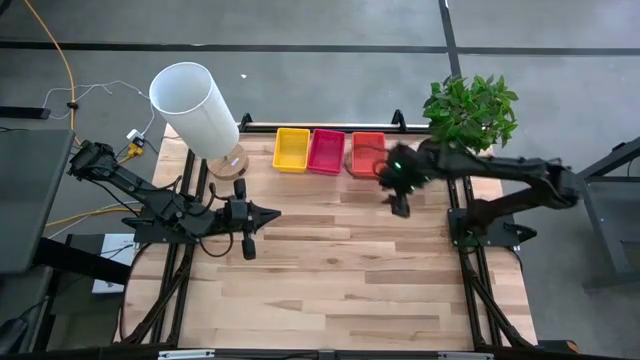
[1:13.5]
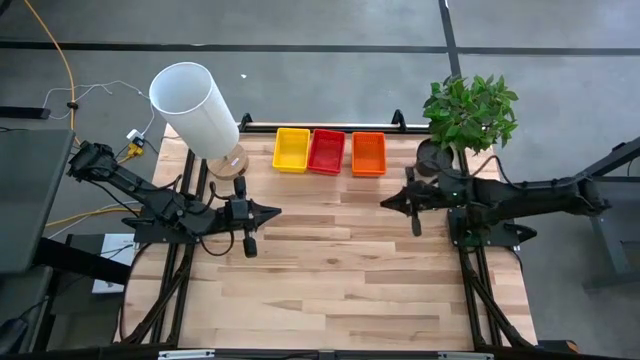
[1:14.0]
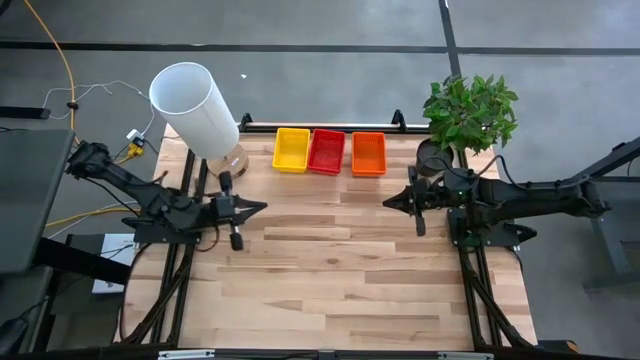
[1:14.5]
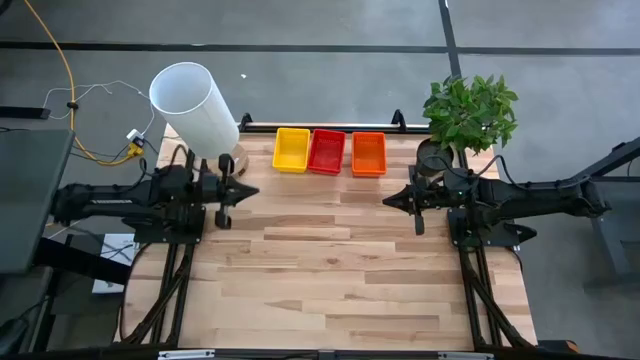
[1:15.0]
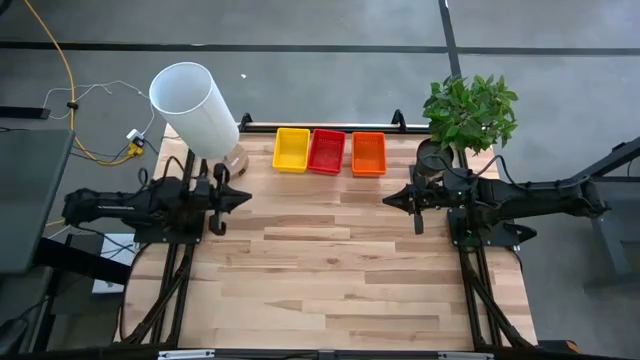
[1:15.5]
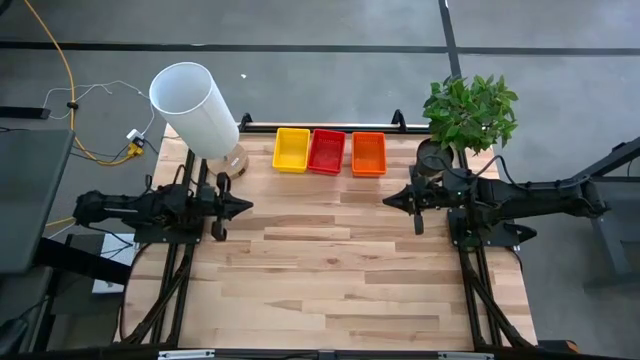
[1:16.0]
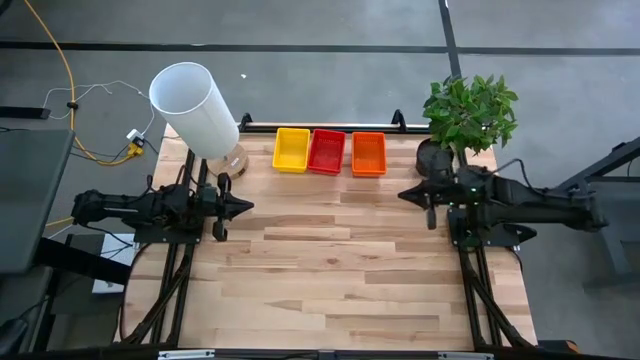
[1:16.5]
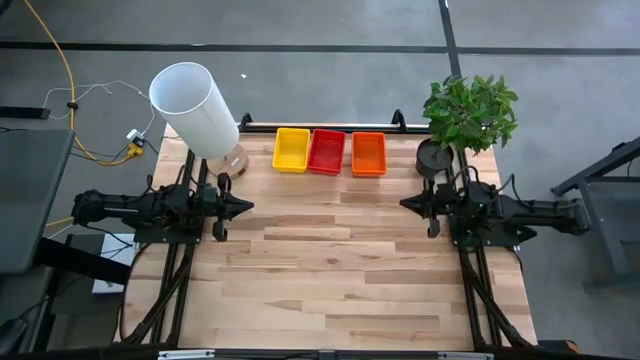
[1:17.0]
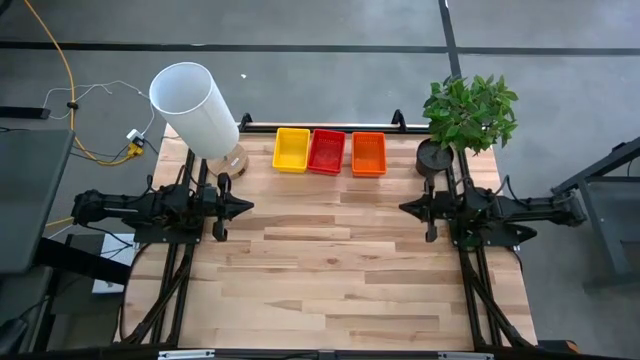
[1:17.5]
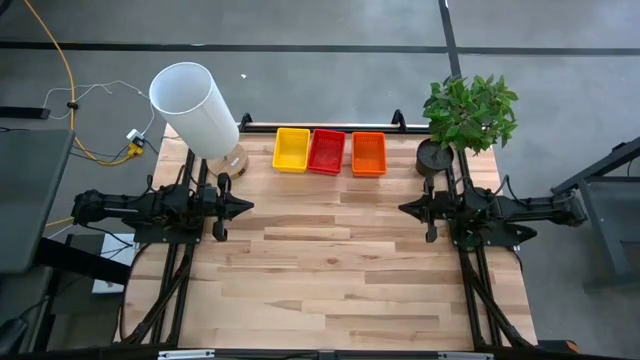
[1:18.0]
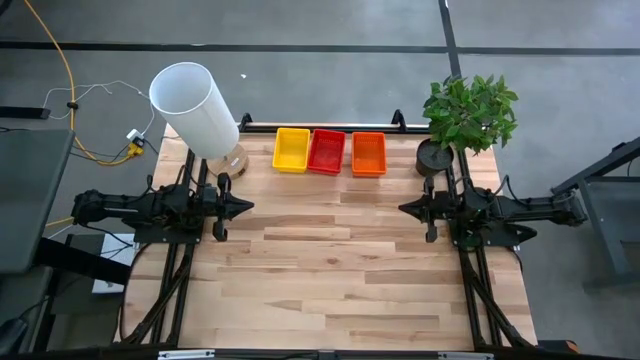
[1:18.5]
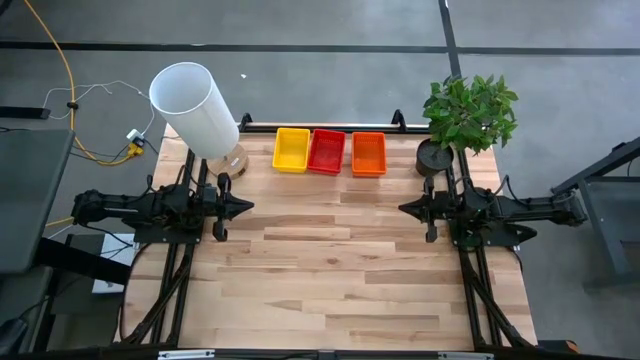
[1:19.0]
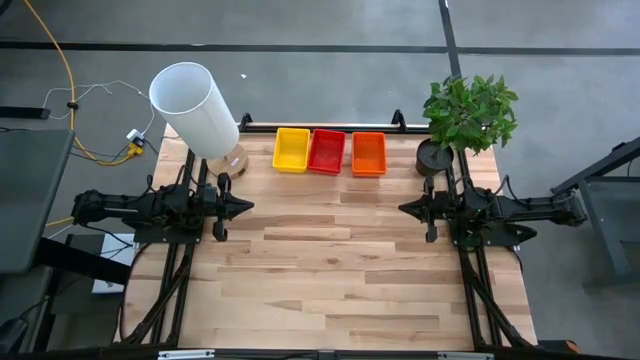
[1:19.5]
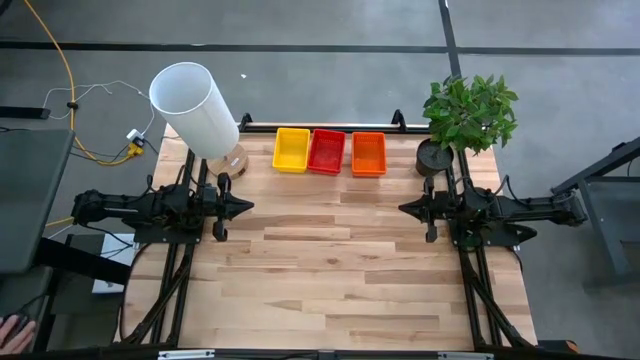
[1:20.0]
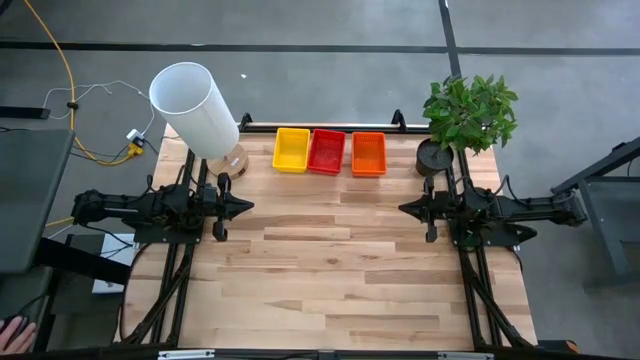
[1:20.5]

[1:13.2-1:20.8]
Return to Home Position
